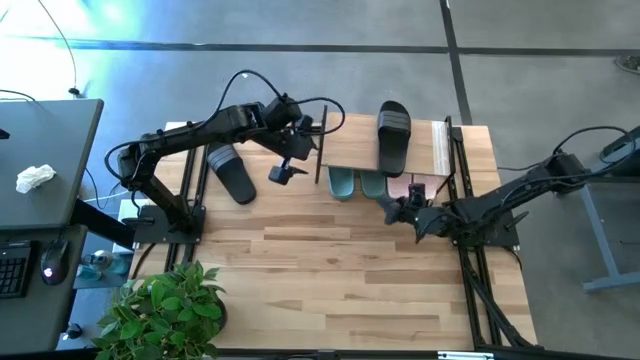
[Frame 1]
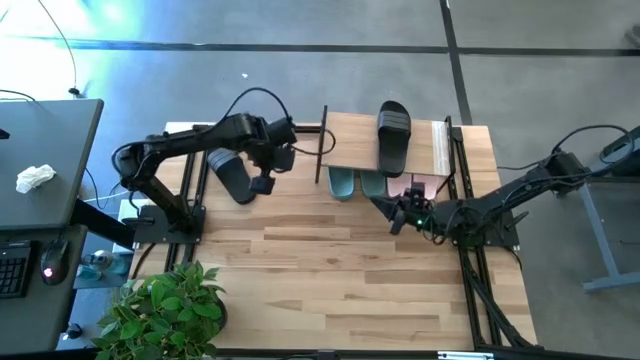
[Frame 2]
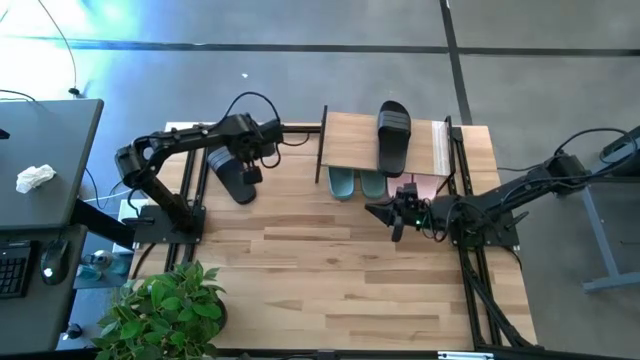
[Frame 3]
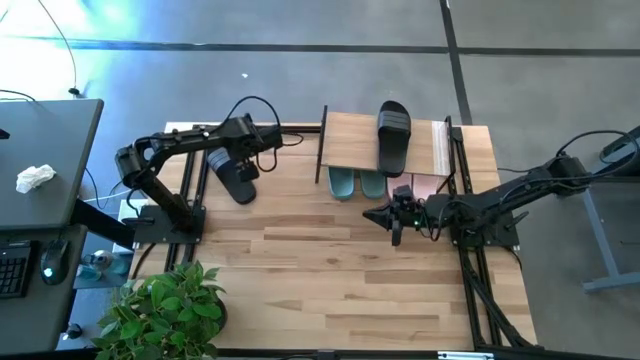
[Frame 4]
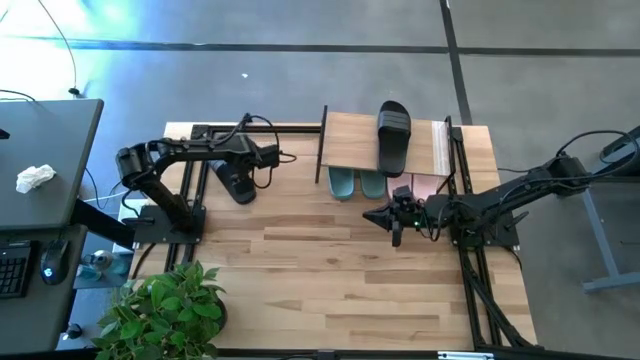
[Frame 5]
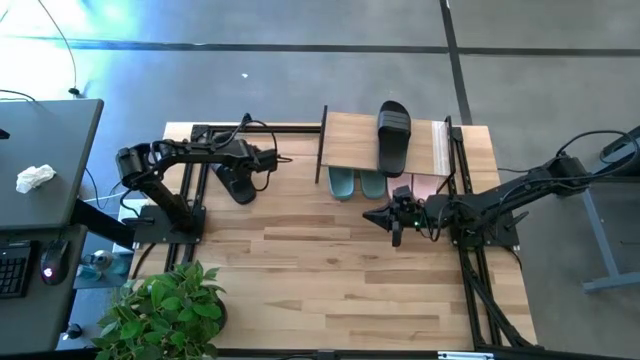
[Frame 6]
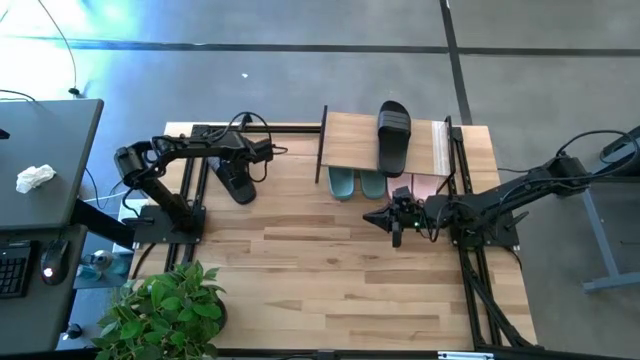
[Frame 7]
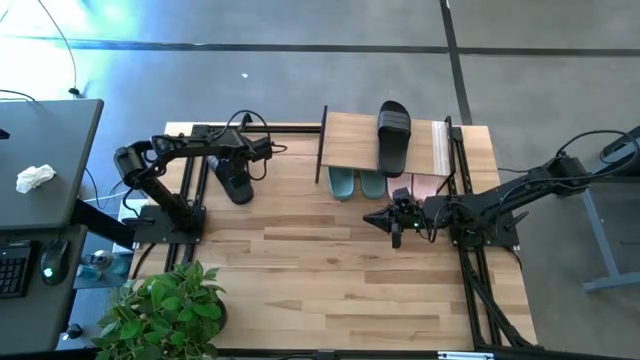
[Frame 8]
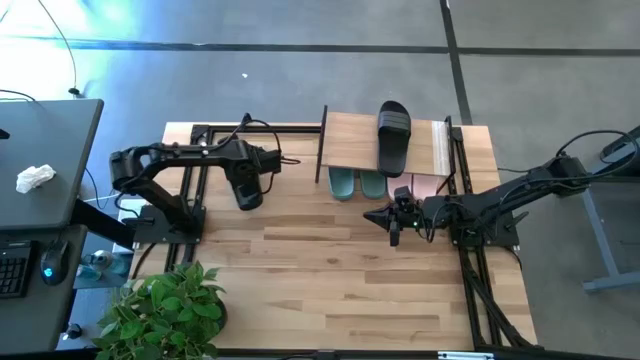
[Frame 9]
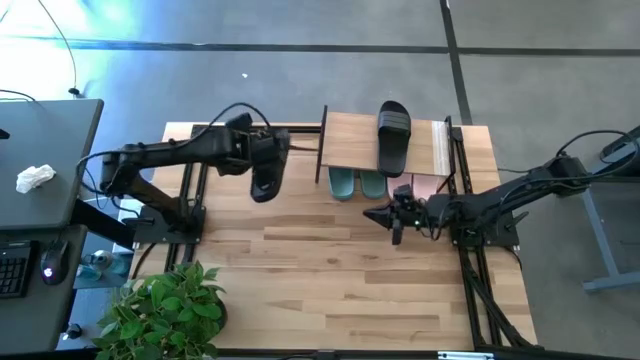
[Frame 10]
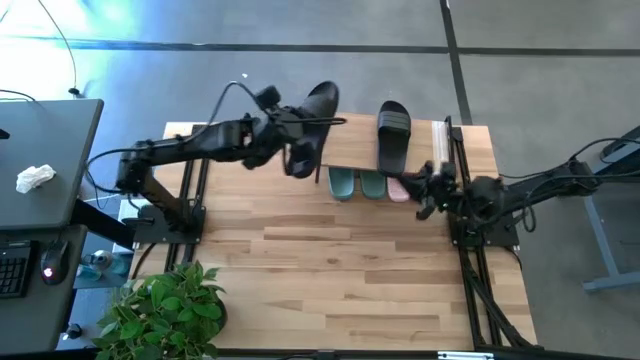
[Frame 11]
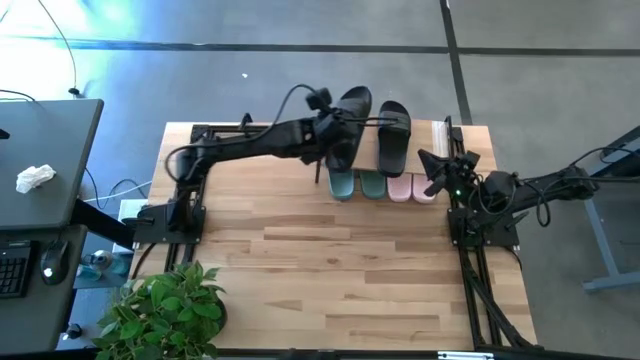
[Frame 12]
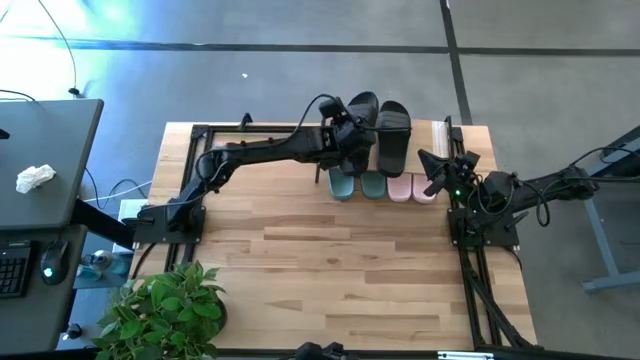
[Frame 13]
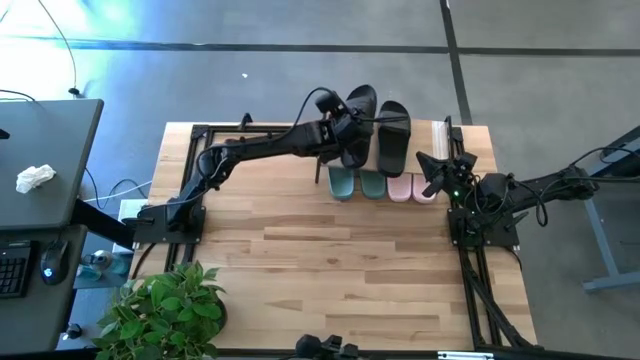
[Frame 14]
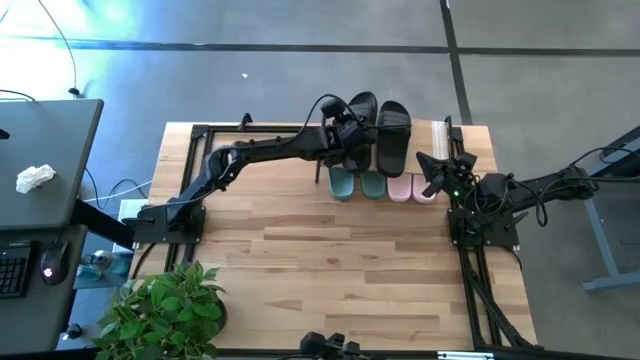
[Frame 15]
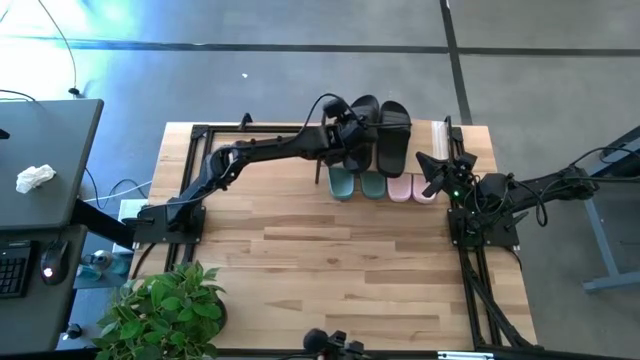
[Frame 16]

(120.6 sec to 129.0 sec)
Task: Pick and place slides into the shelf
Put the black slide on the shelf

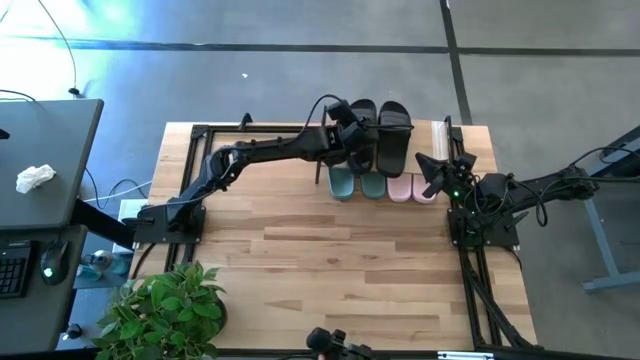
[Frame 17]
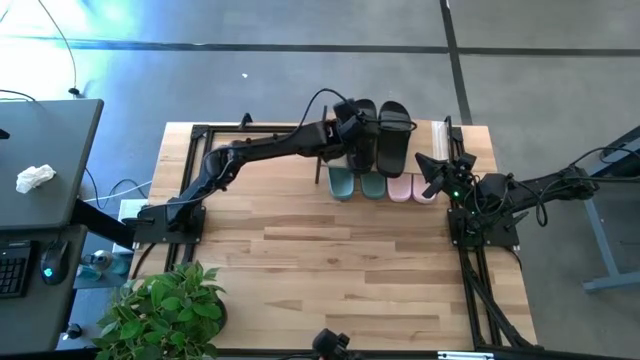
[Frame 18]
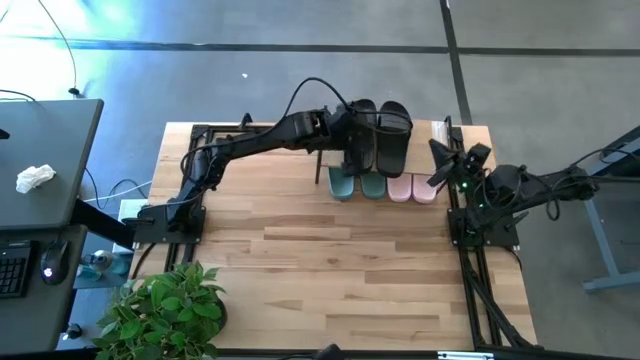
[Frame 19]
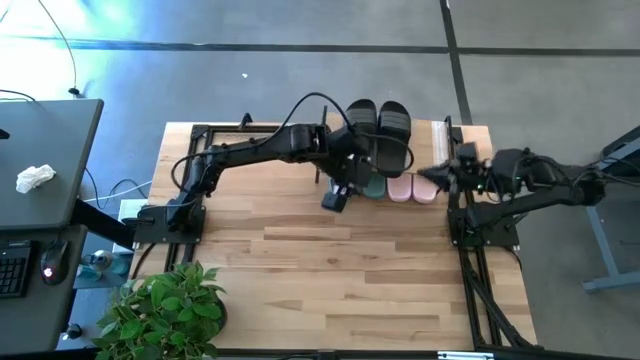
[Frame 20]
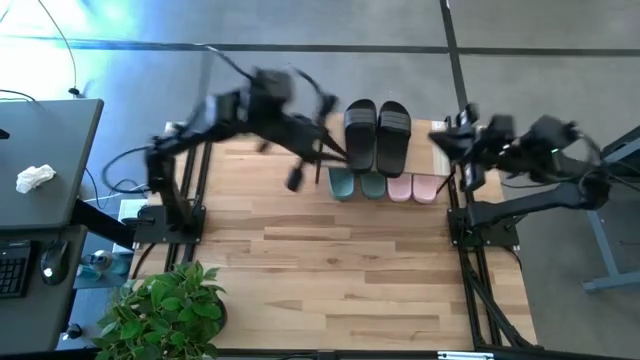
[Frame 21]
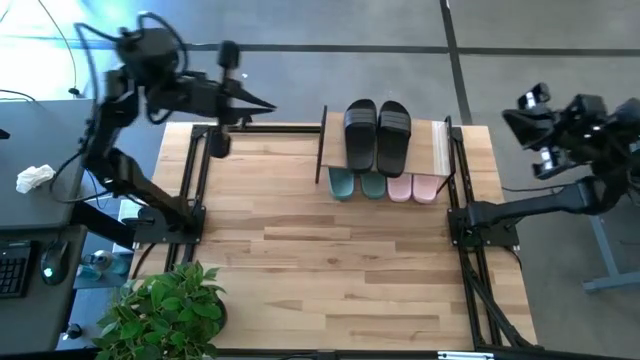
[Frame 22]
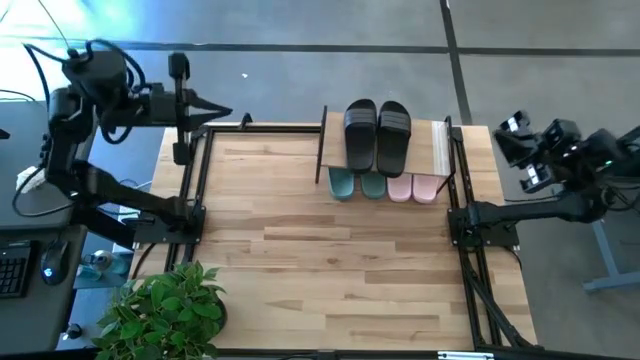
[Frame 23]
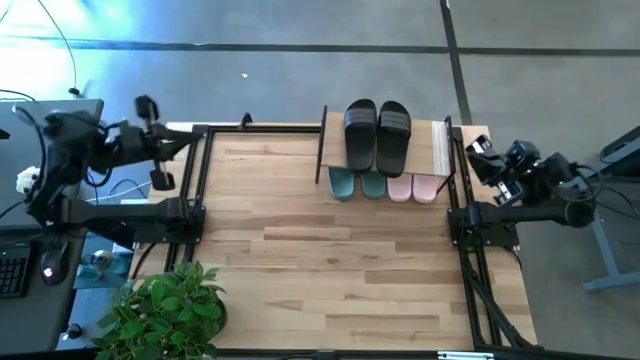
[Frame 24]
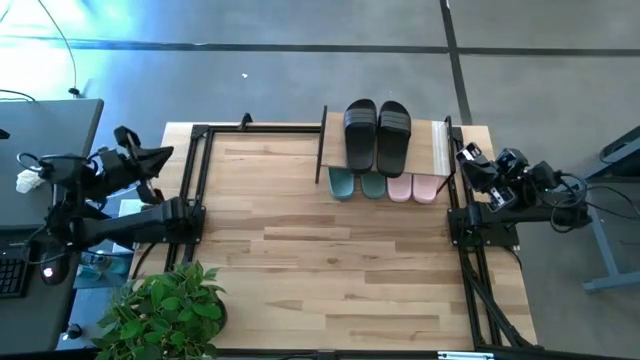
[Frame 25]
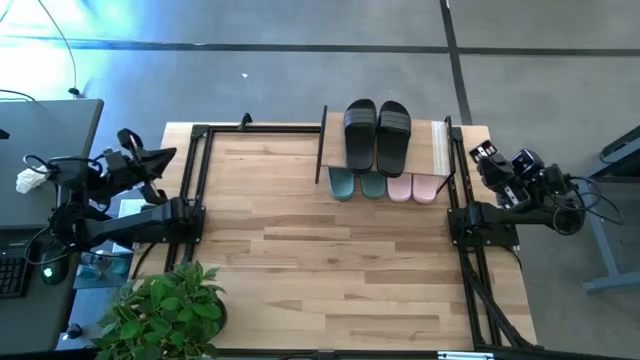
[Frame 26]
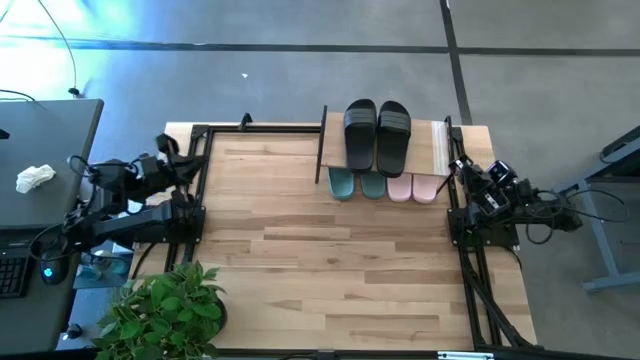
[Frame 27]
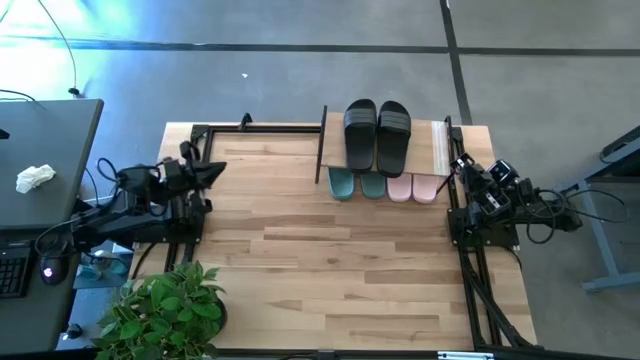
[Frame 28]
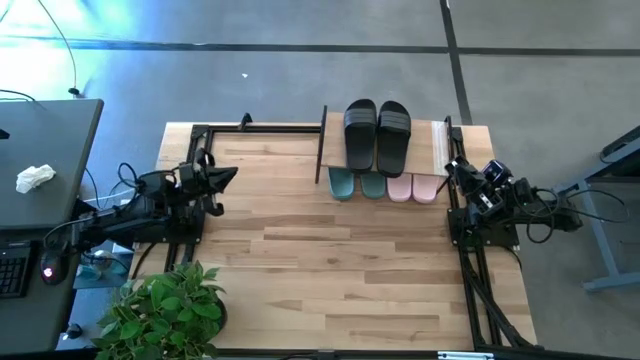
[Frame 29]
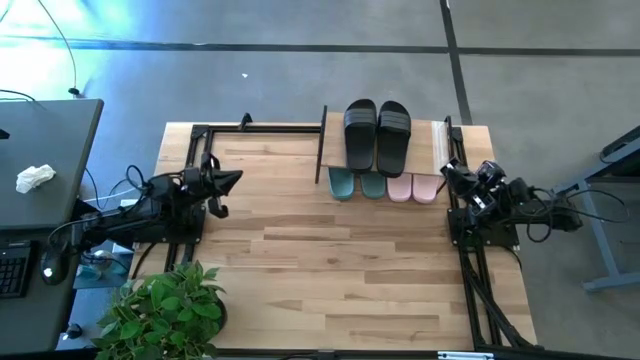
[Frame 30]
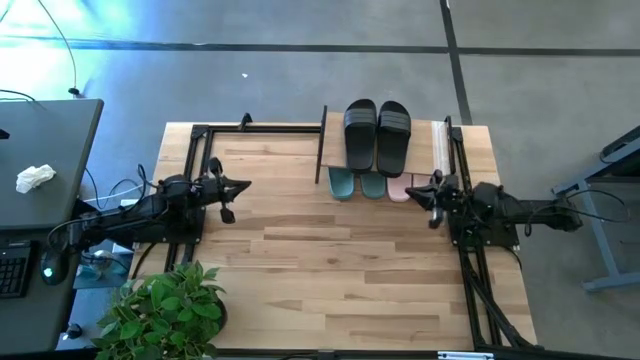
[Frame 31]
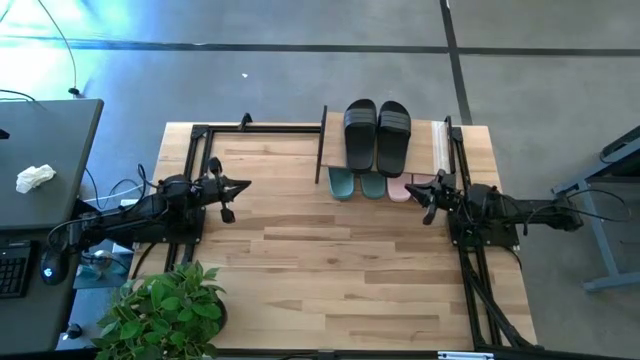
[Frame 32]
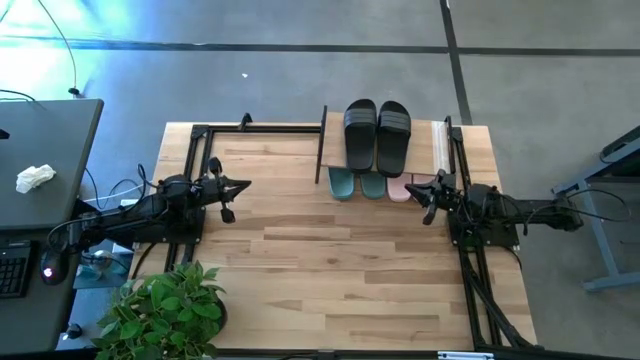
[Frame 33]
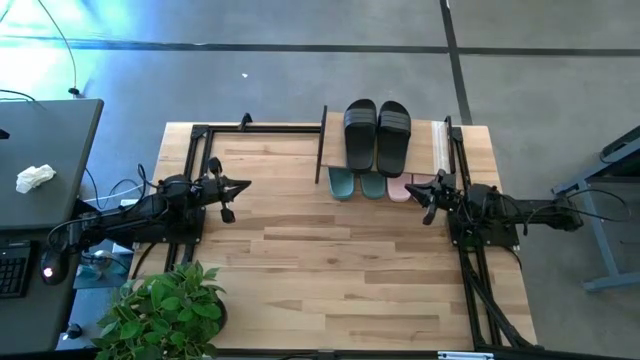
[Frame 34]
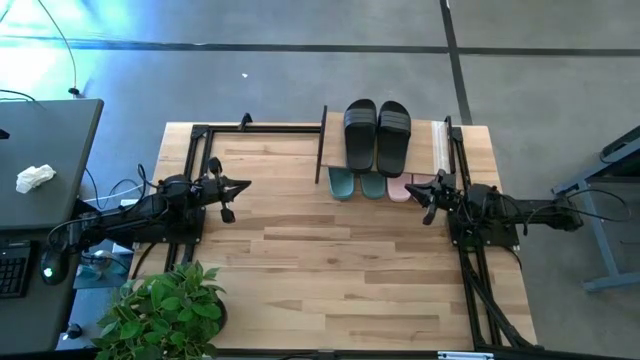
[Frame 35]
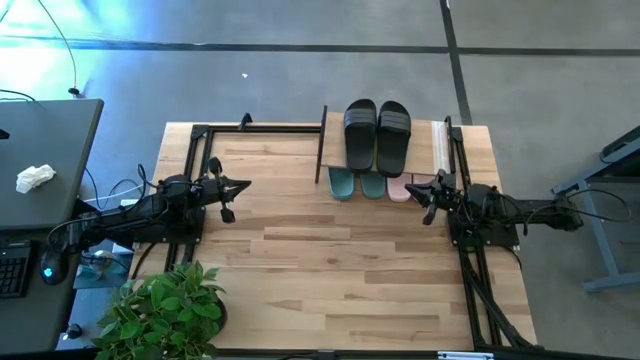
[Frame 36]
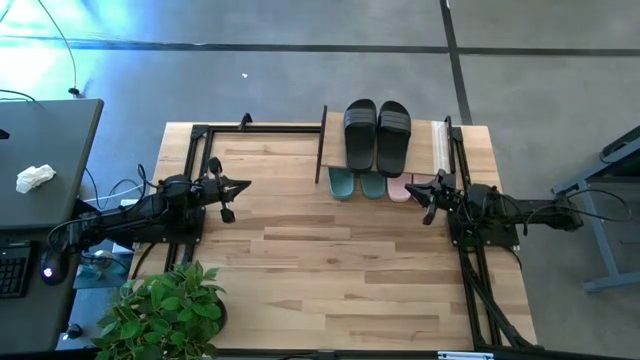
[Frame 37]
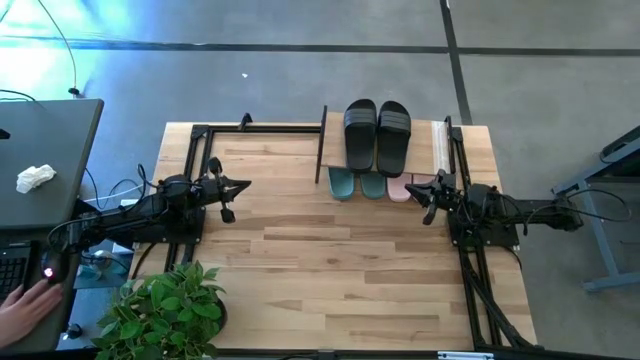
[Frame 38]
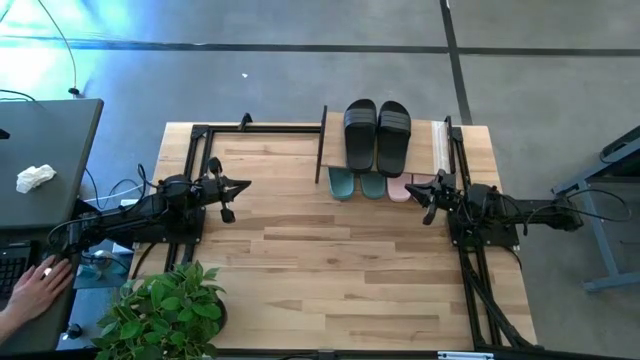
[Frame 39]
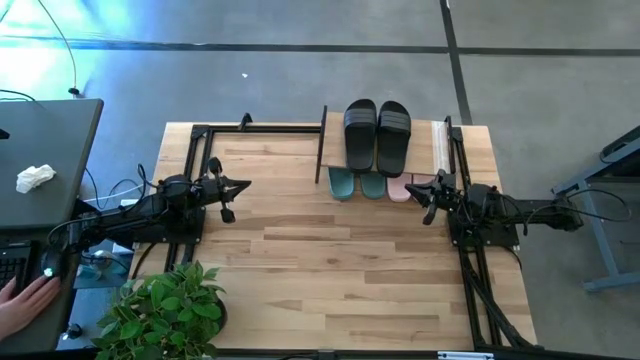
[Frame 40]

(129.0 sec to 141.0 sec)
Return to Home Position
